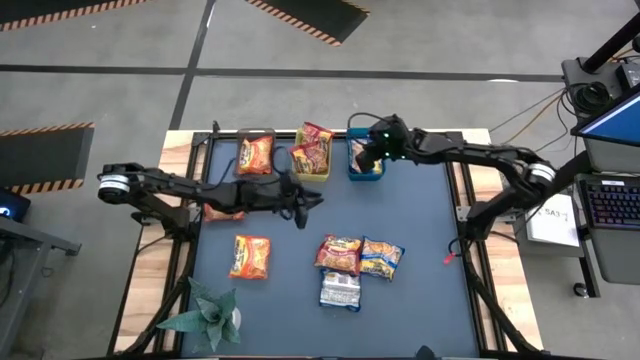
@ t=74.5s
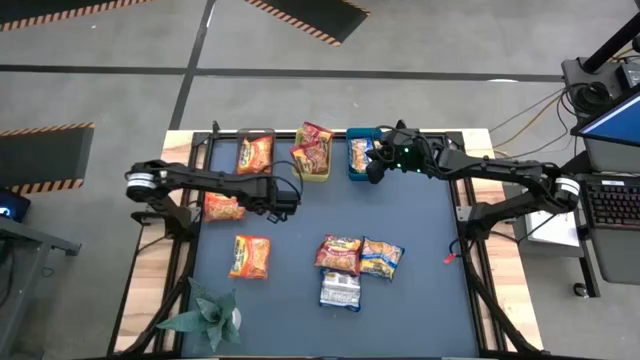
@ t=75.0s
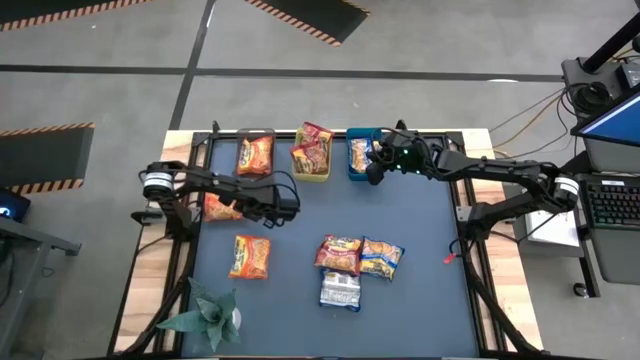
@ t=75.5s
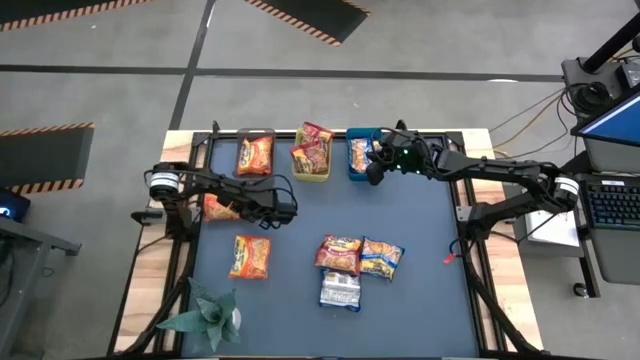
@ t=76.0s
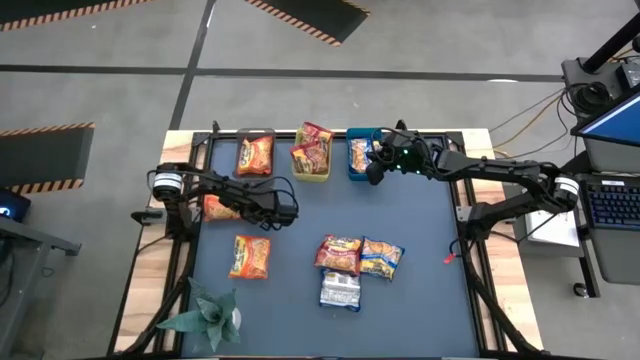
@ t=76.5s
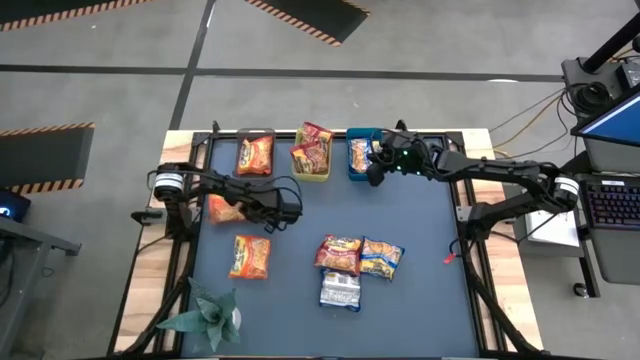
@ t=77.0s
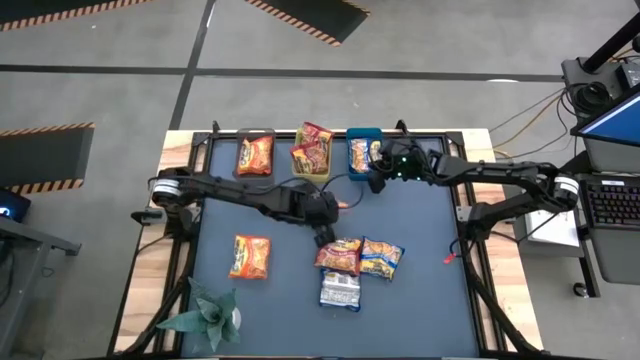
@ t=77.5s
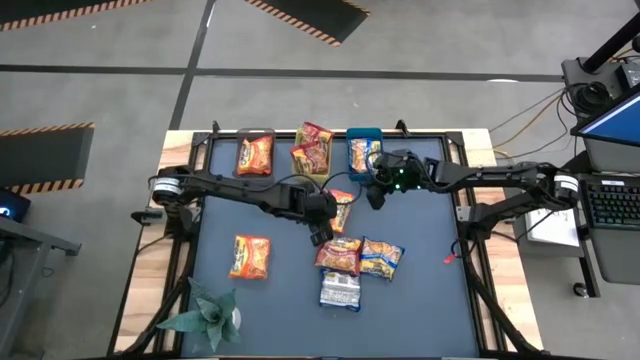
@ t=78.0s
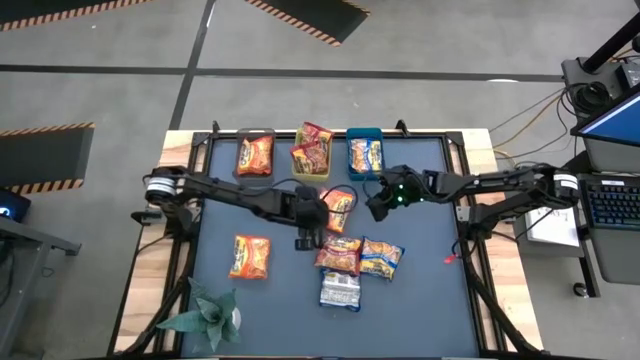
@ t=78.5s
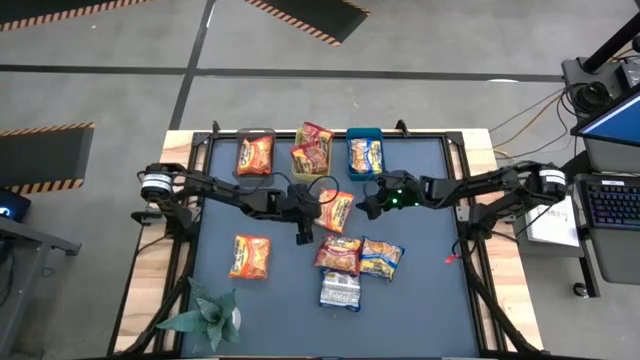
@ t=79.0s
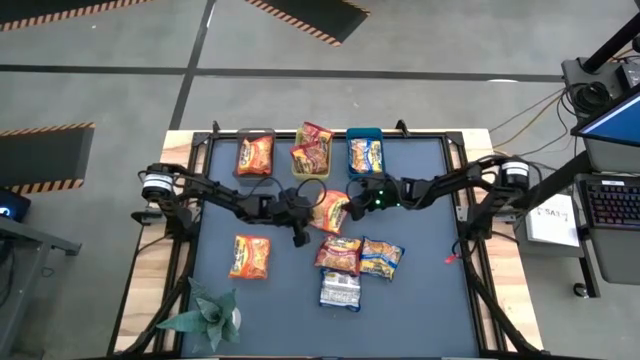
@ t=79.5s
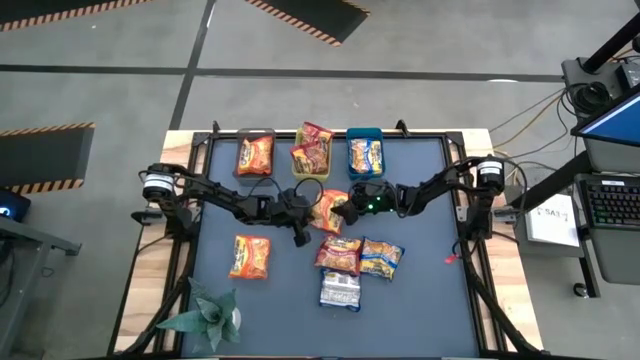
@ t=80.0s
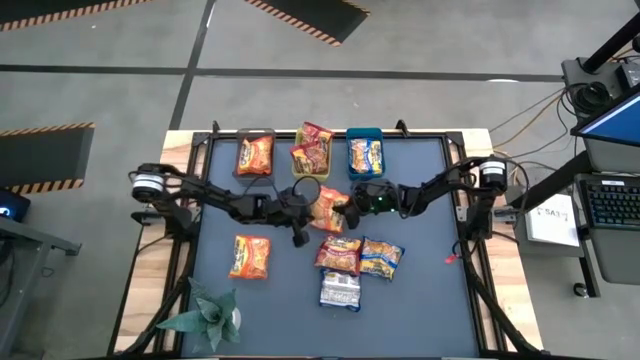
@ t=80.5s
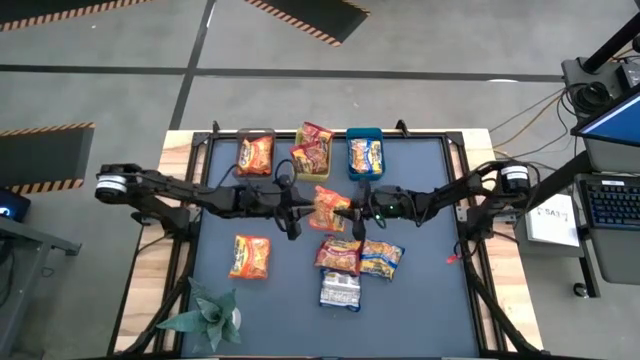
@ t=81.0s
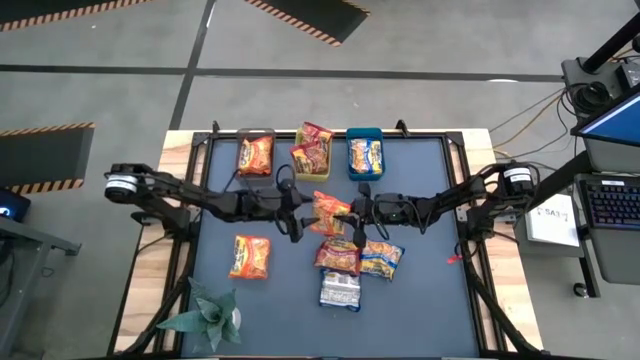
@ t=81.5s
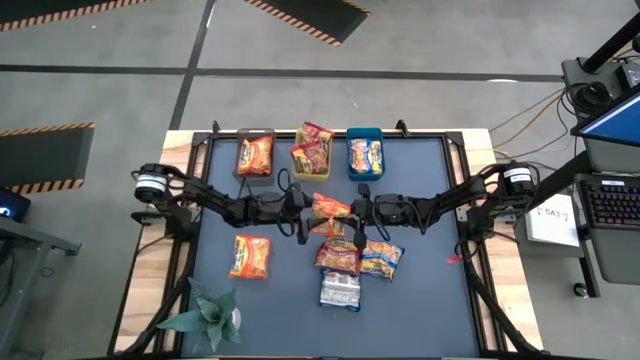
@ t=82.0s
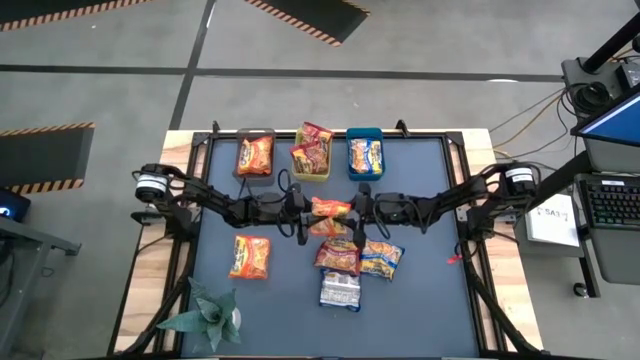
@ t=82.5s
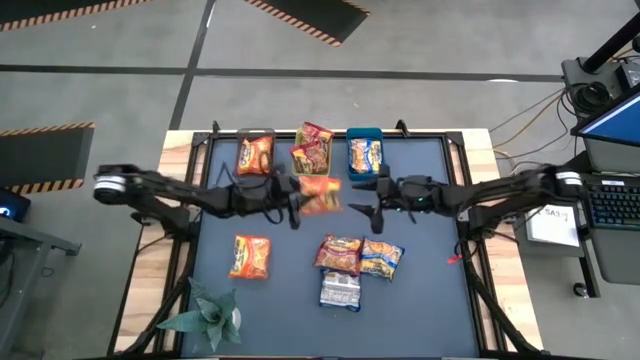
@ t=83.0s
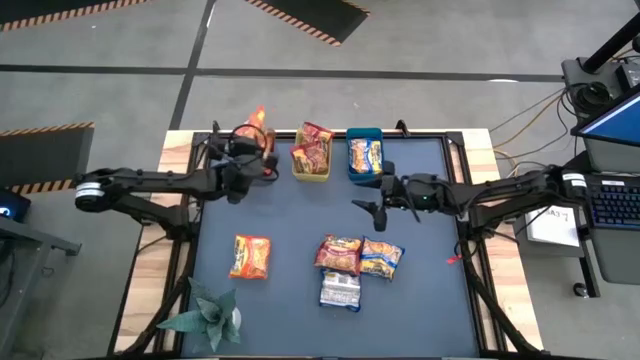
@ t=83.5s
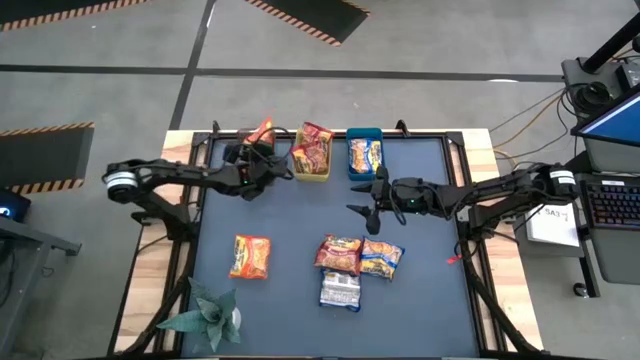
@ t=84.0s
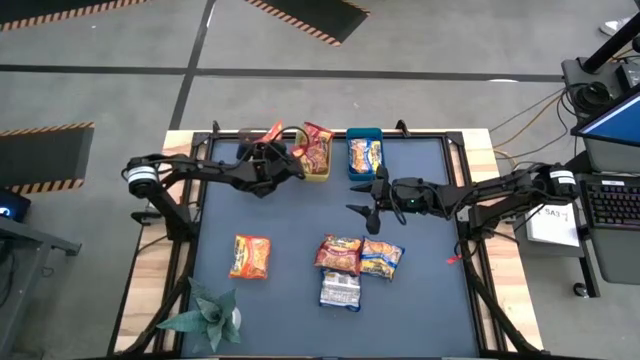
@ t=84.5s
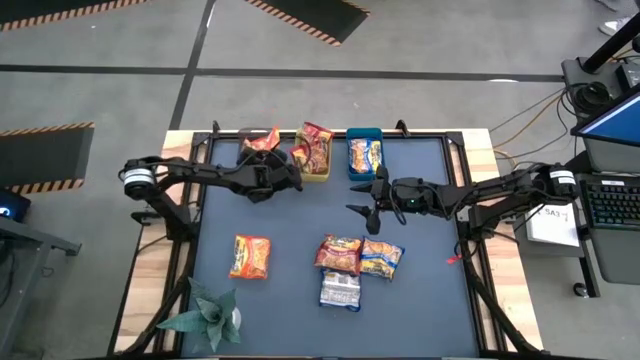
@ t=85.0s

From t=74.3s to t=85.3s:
Task: Sort Maruchan noodles
Put the orange noodle pack into the black bin

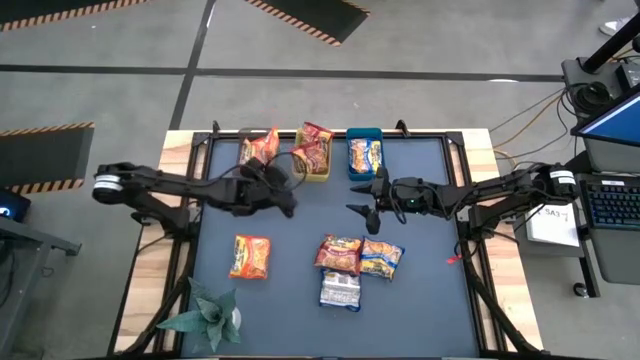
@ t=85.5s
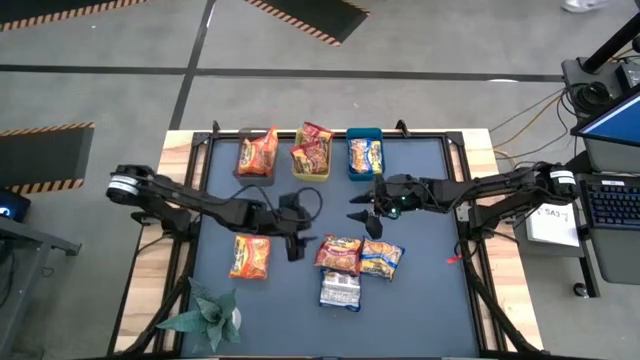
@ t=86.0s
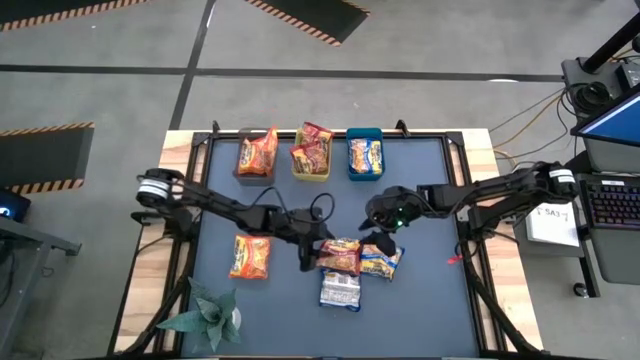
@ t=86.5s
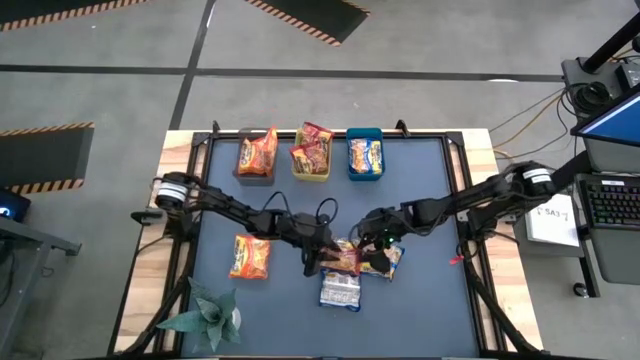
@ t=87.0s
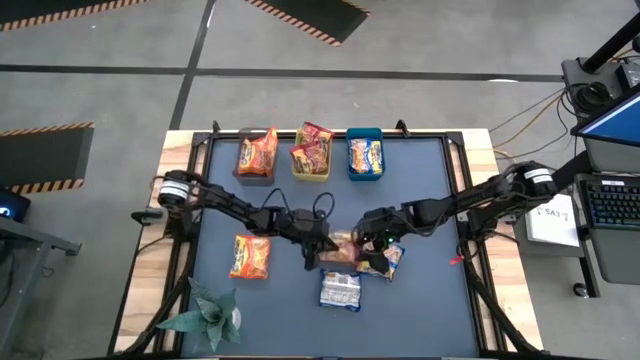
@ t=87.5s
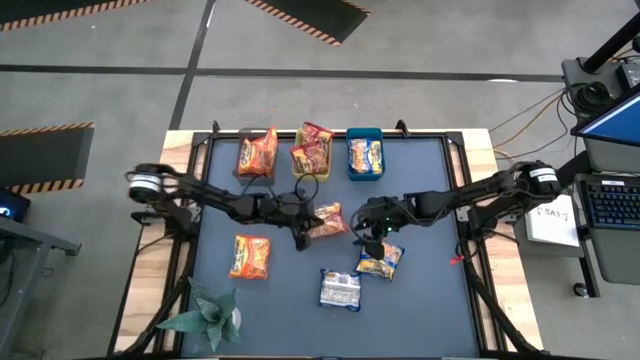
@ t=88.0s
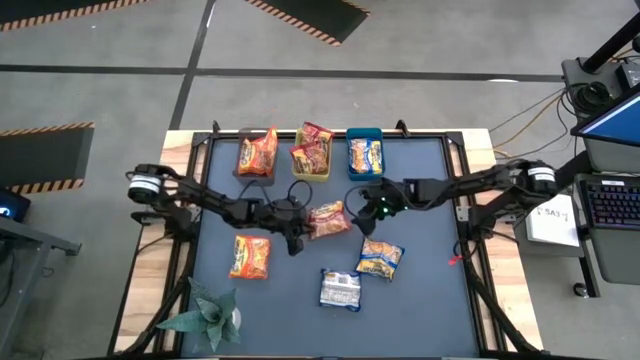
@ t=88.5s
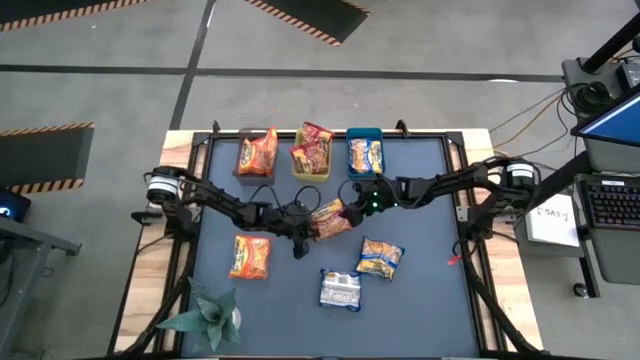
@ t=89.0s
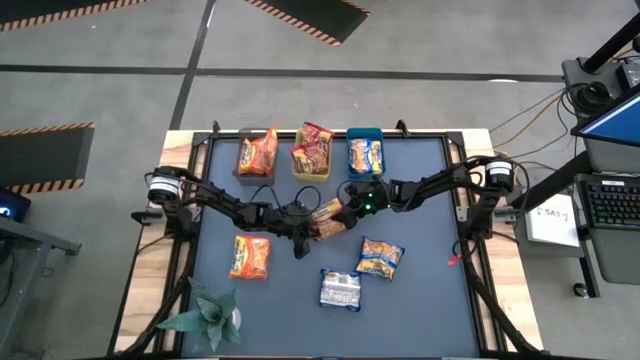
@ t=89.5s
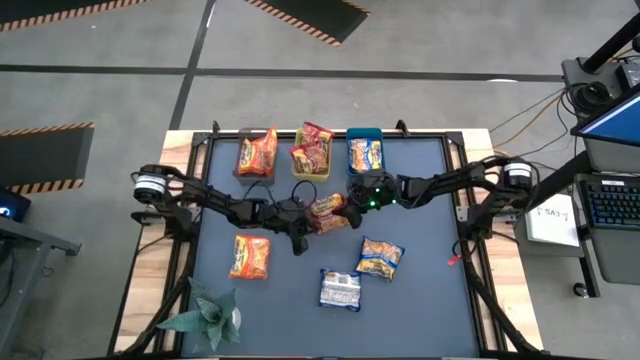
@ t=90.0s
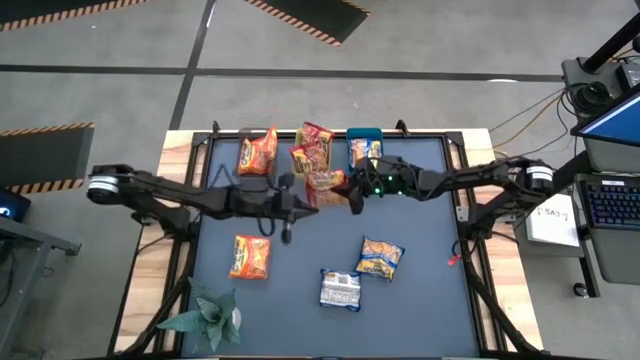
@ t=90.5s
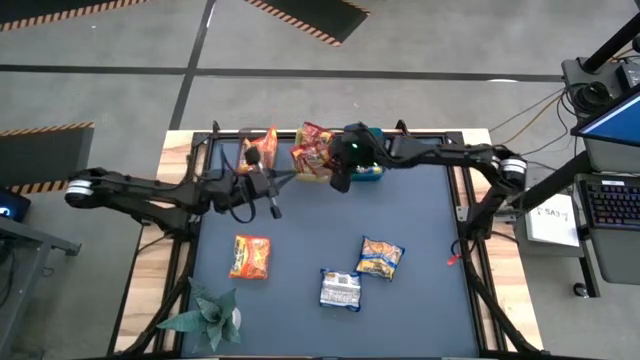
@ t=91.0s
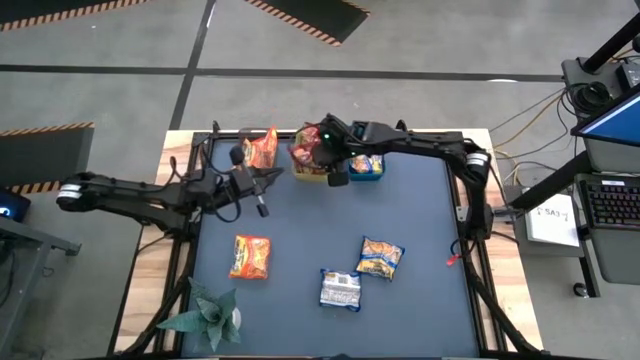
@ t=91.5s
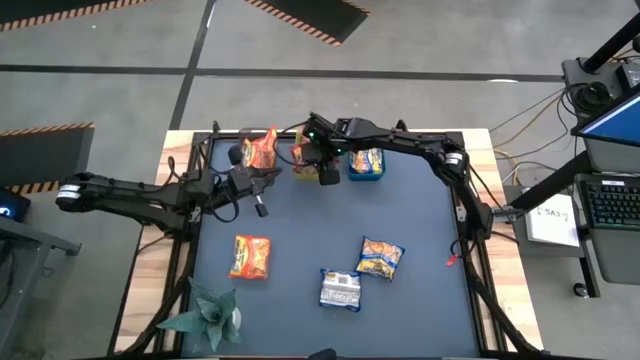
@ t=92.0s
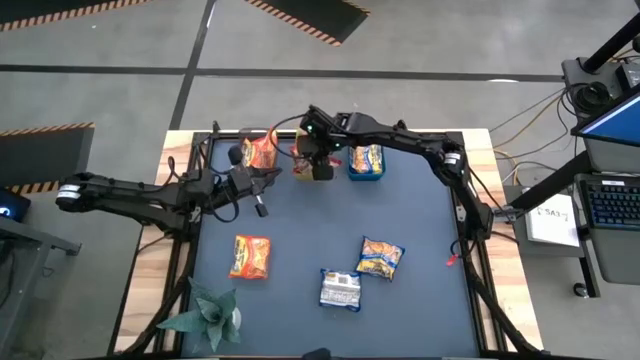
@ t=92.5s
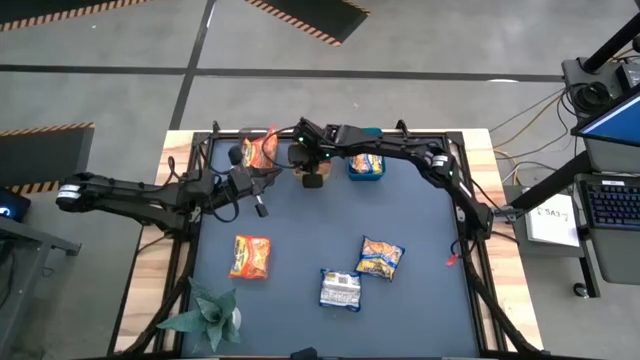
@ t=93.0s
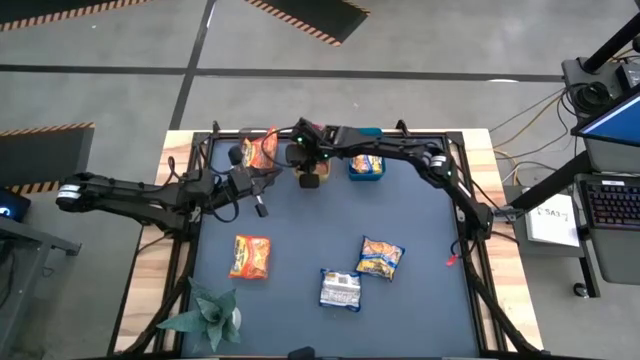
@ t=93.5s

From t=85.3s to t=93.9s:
Put the red noodle pack into the yellow bin
